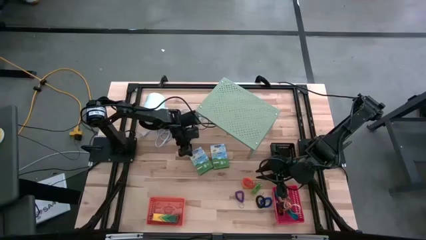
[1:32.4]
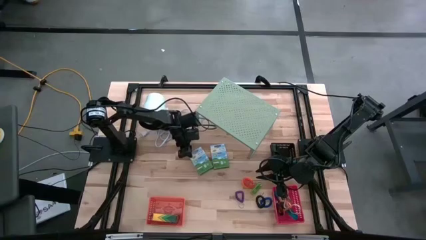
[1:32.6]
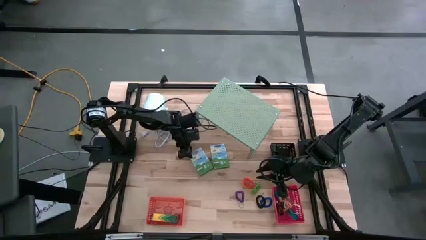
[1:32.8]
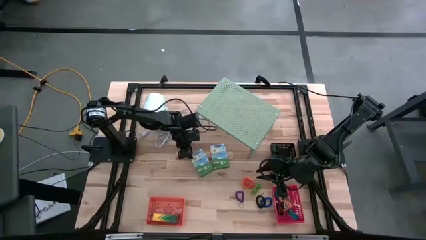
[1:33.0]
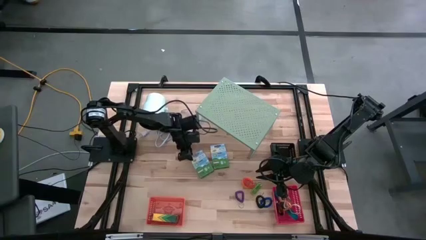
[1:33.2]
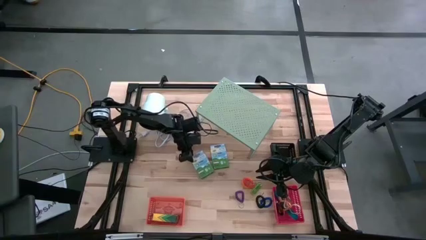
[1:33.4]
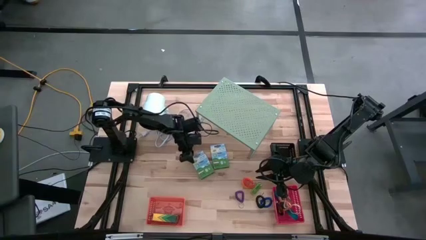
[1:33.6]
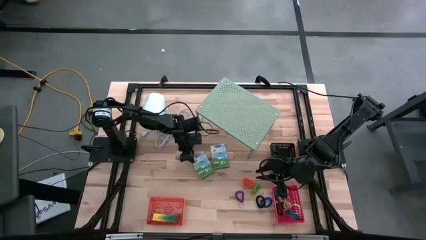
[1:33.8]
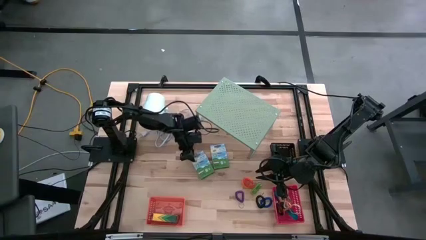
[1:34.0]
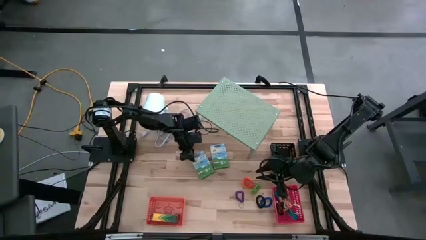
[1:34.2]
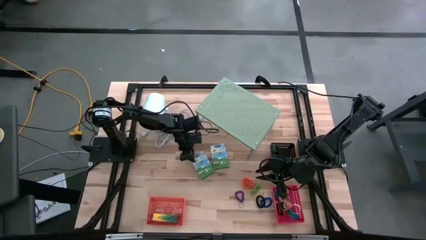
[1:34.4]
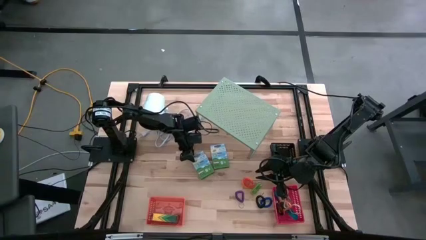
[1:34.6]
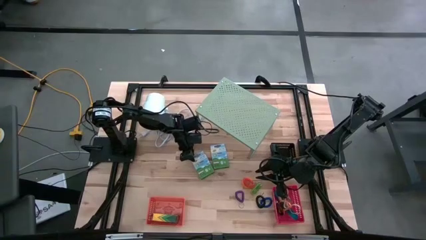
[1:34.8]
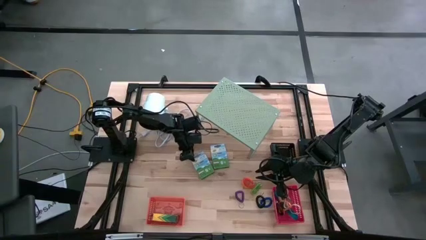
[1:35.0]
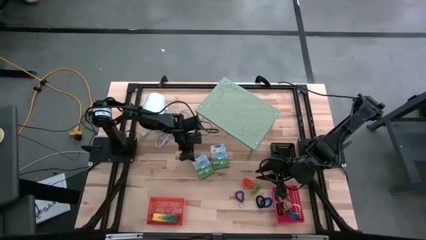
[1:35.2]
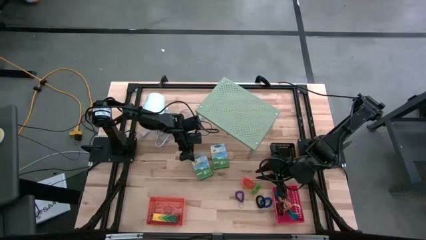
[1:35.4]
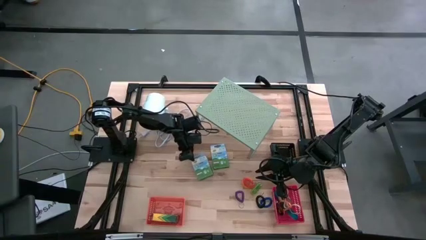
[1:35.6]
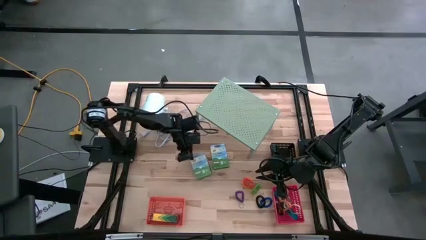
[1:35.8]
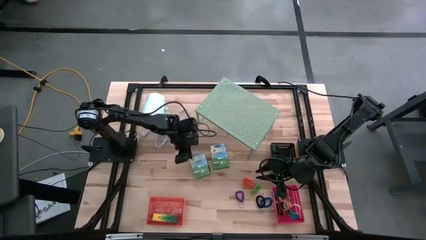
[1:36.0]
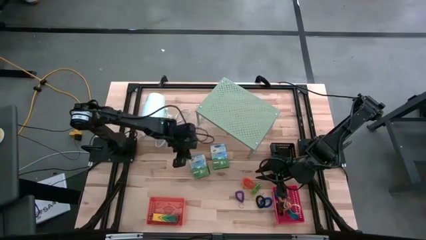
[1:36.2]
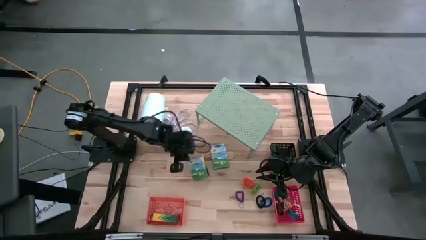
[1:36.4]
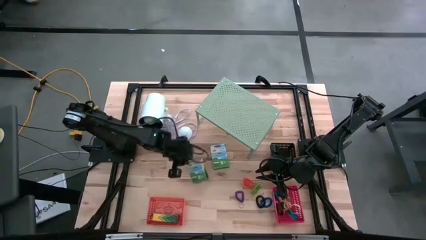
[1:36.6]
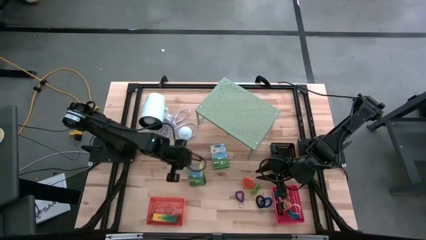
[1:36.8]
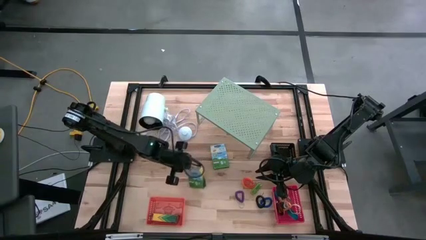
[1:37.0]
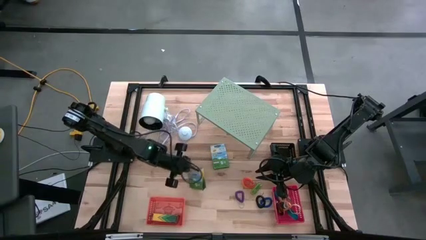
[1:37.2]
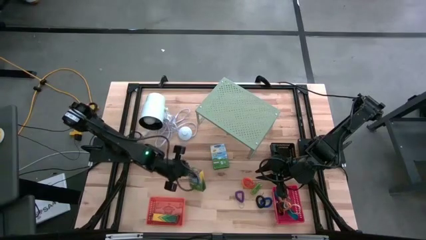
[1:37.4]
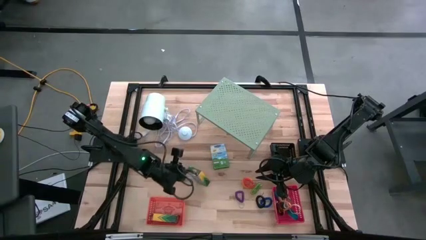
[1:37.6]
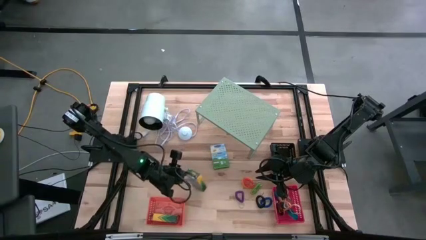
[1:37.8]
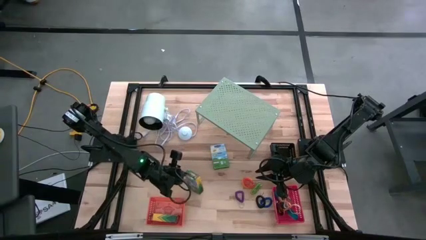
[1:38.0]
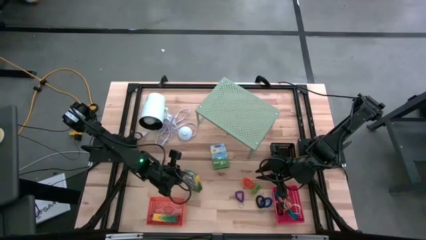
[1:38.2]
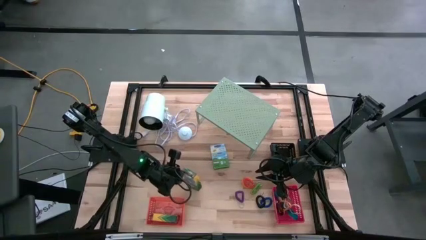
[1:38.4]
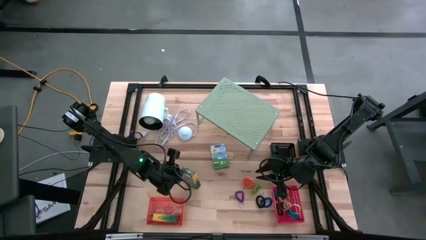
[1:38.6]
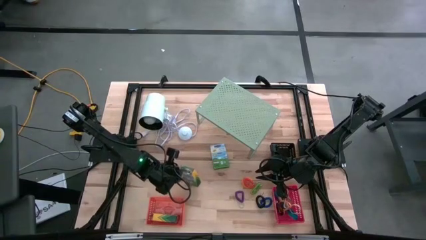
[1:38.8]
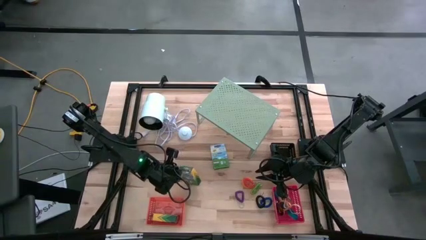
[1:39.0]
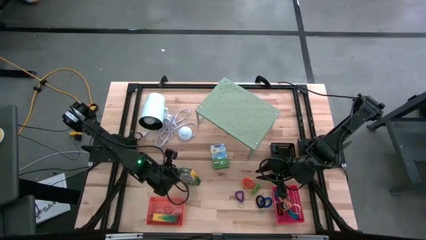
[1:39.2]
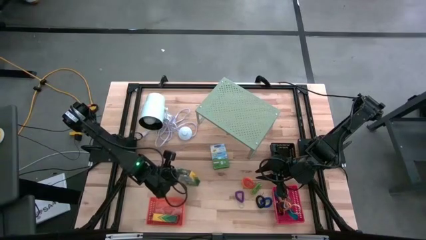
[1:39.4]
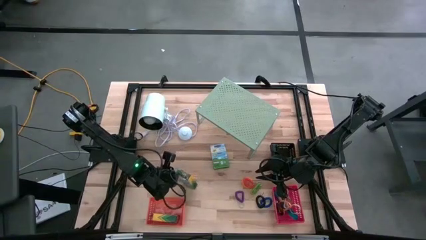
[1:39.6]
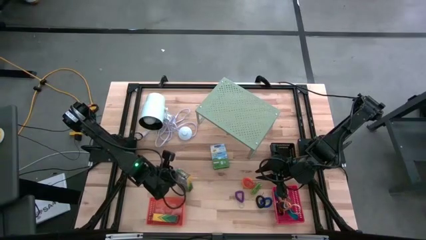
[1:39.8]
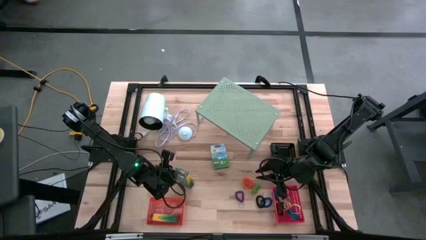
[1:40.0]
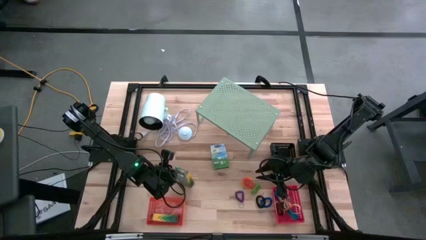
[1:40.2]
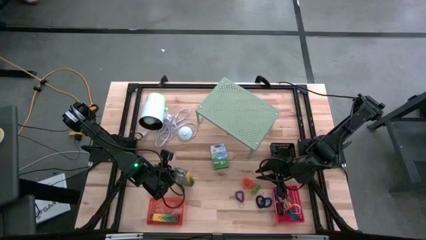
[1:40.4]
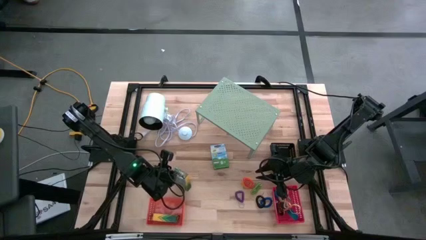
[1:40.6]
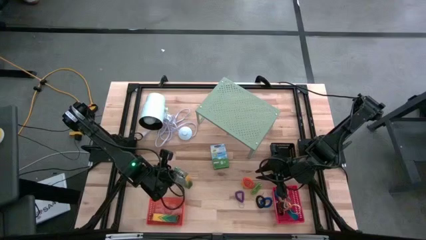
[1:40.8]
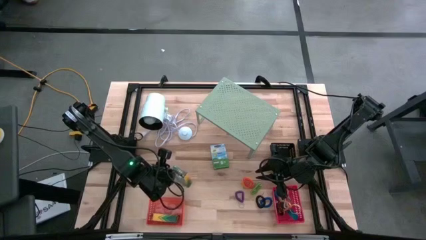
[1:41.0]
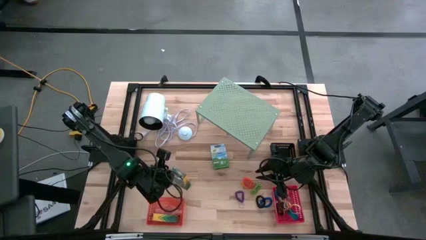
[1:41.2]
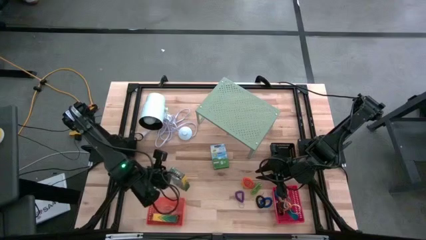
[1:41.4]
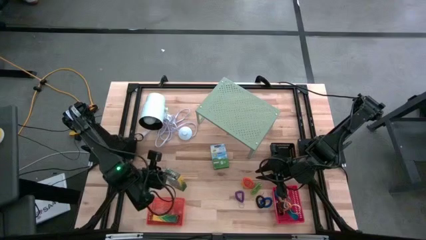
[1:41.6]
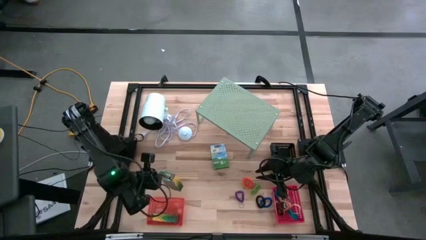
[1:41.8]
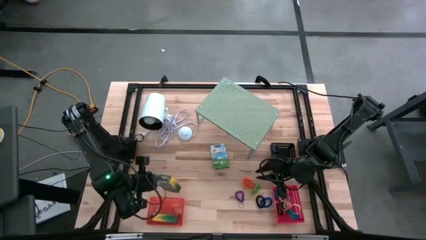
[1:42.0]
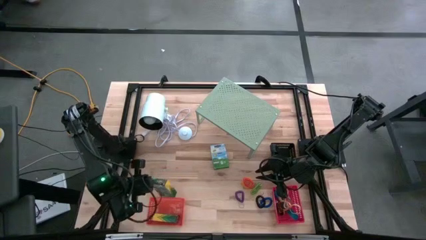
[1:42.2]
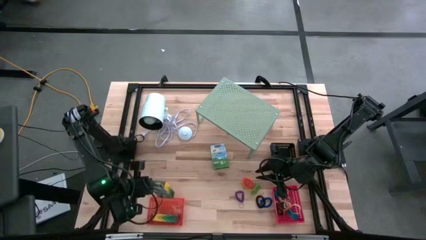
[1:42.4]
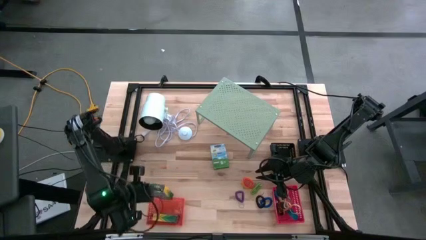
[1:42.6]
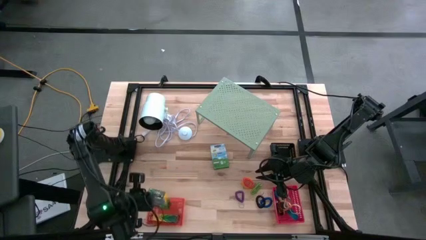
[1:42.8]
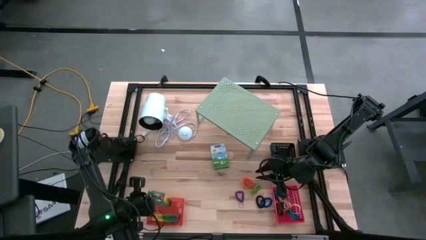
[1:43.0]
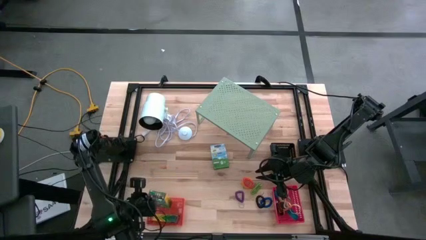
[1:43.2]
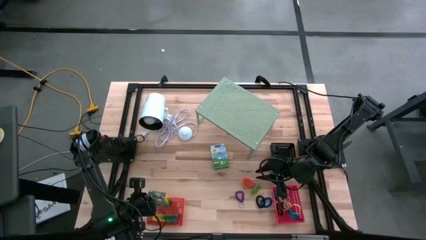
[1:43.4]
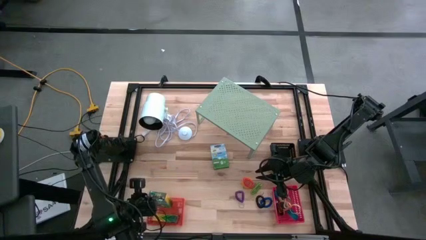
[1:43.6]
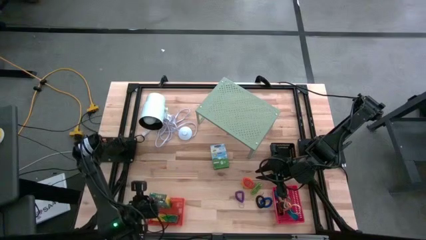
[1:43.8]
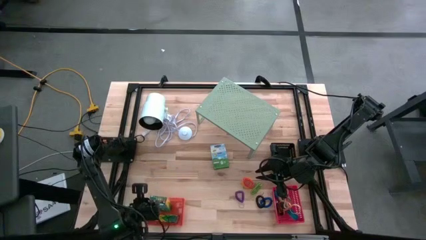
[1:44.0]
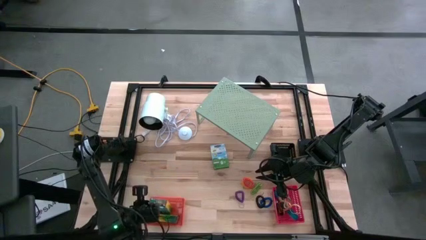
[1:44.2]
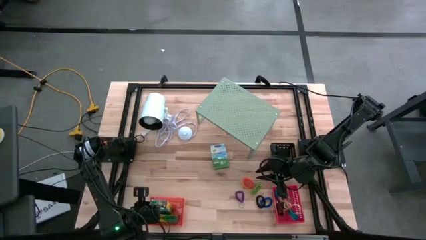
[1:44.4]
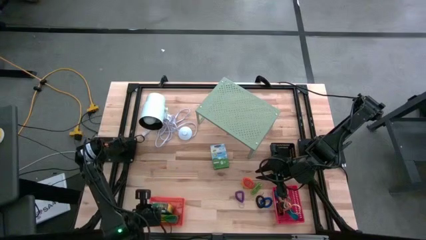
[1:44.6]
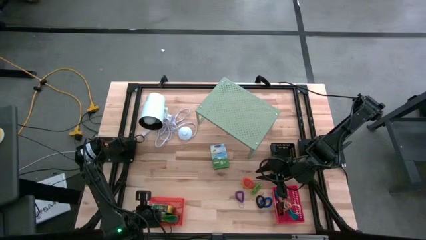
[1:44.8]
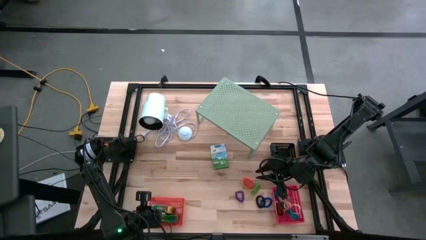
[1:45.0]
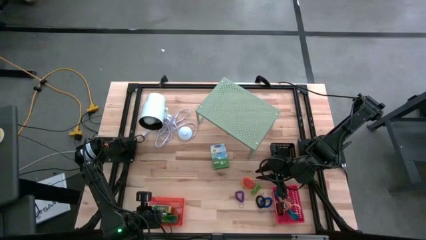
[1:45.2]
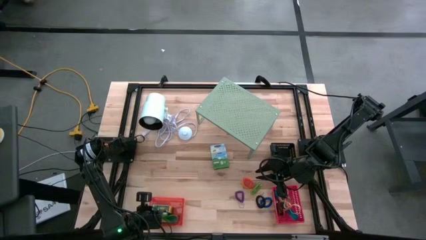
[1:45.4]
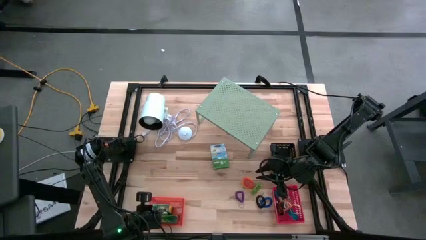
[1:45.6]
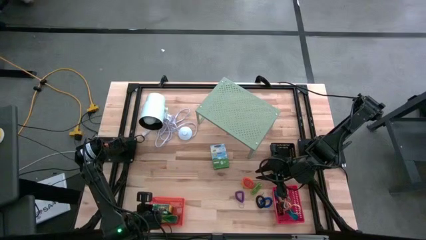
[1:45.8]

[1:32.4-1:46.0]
Task: Pick & Place Office Desk Supplies
Put the left crayon box into the orange bin
